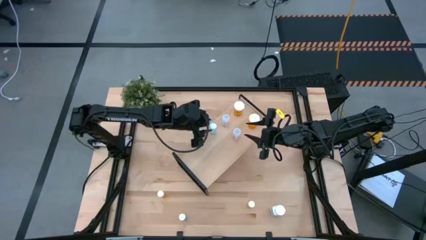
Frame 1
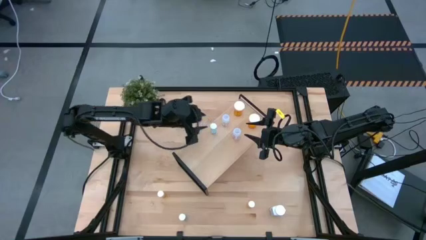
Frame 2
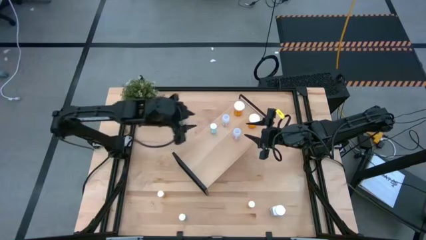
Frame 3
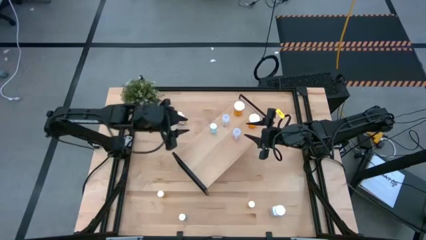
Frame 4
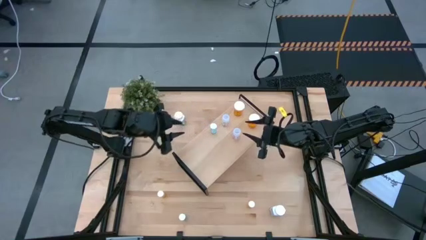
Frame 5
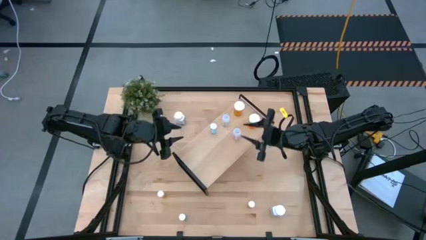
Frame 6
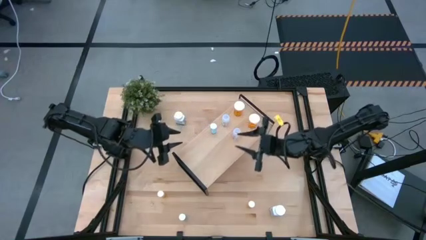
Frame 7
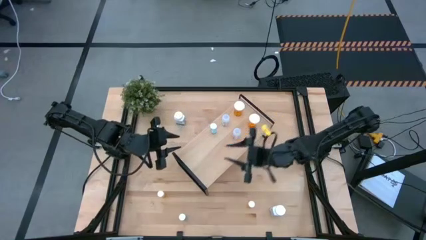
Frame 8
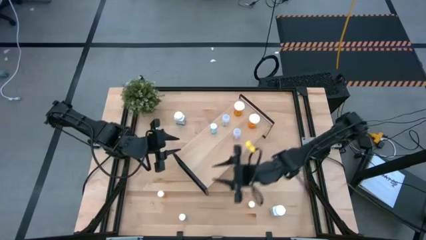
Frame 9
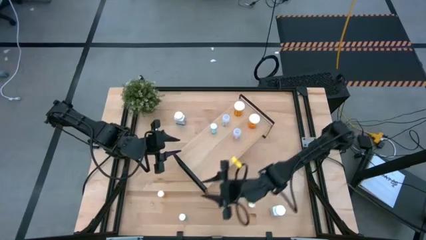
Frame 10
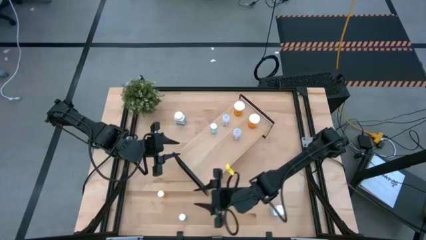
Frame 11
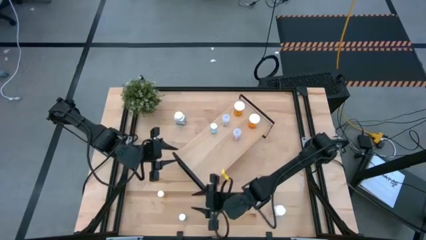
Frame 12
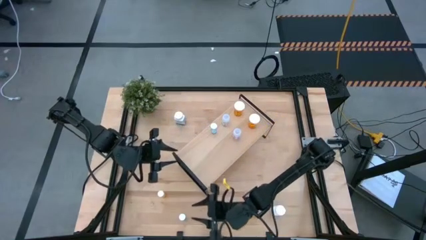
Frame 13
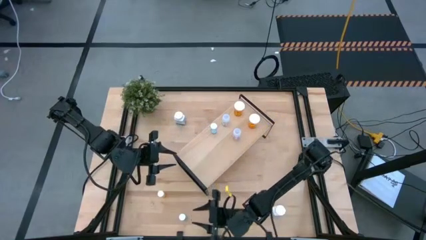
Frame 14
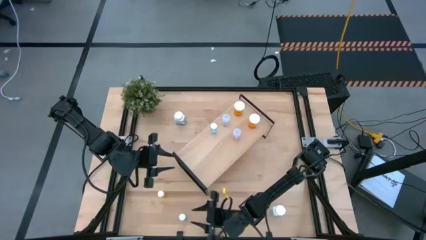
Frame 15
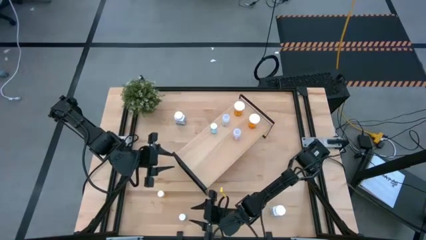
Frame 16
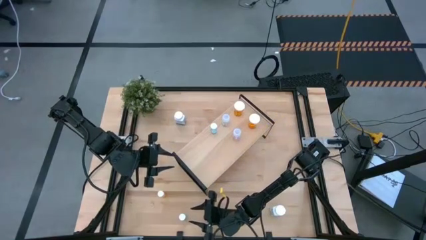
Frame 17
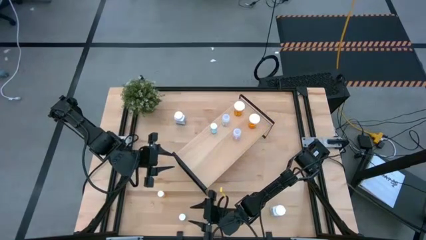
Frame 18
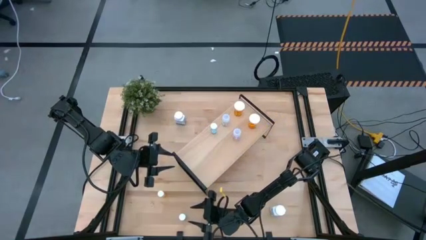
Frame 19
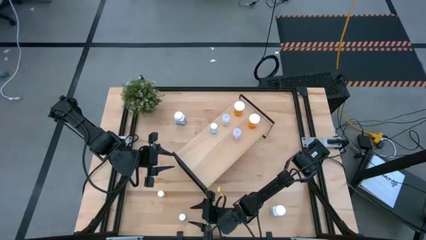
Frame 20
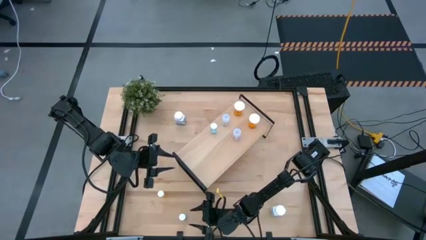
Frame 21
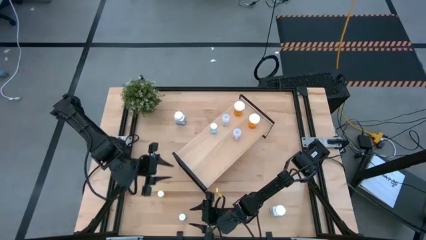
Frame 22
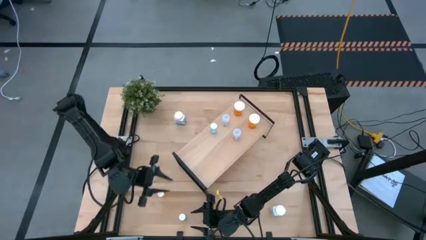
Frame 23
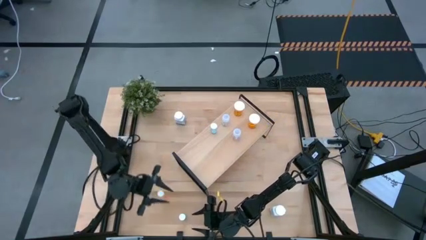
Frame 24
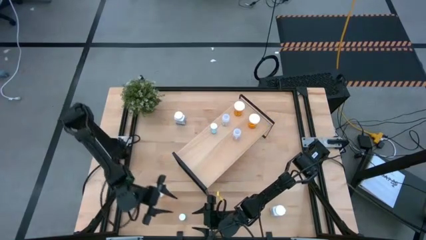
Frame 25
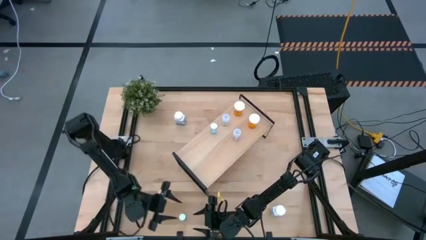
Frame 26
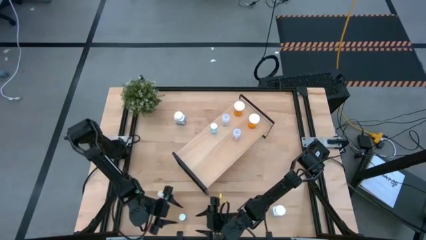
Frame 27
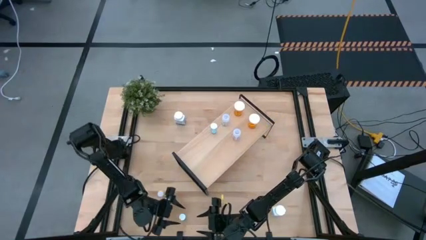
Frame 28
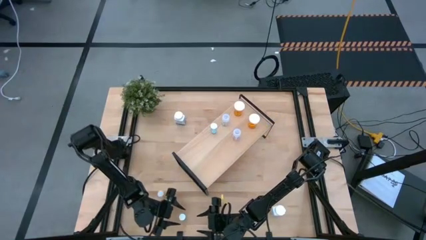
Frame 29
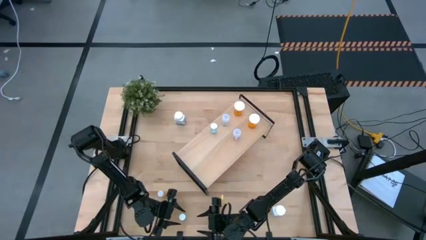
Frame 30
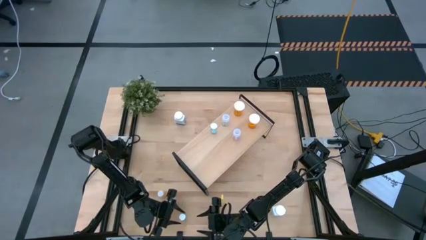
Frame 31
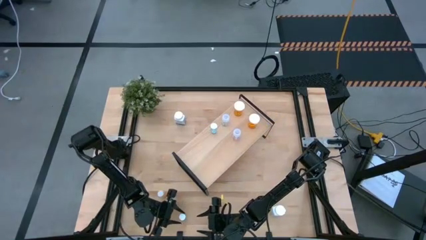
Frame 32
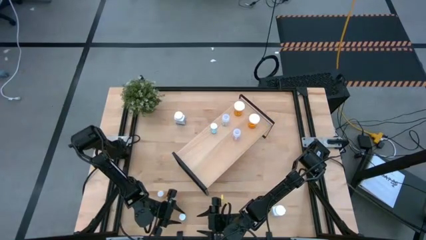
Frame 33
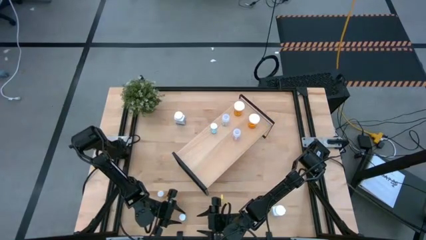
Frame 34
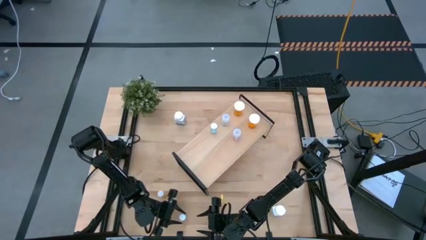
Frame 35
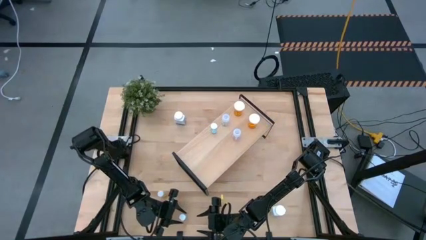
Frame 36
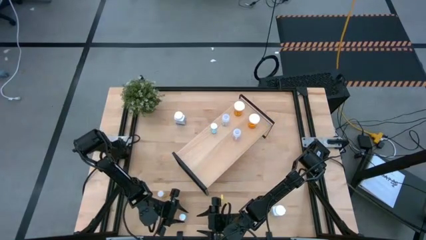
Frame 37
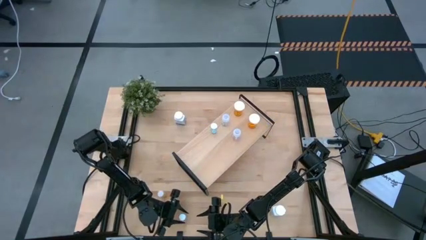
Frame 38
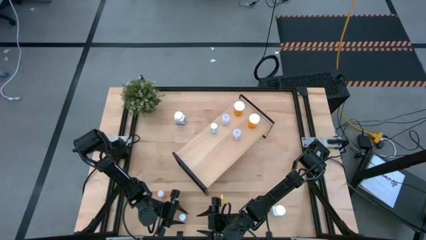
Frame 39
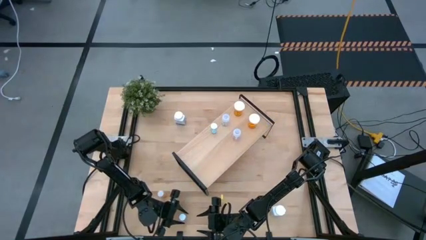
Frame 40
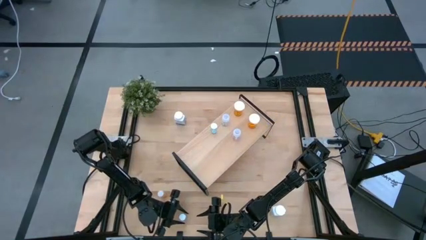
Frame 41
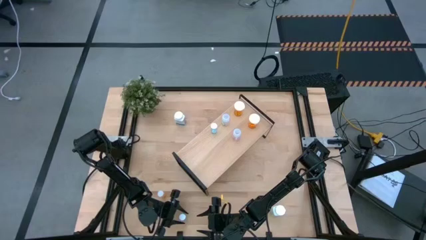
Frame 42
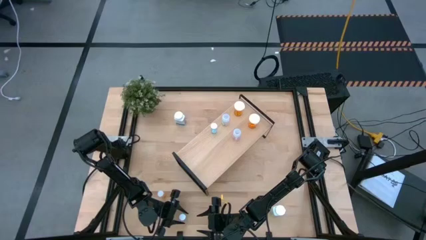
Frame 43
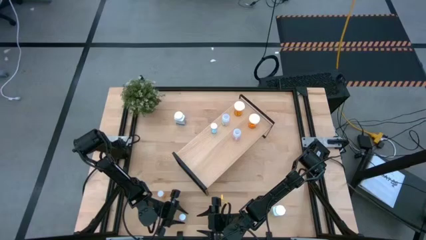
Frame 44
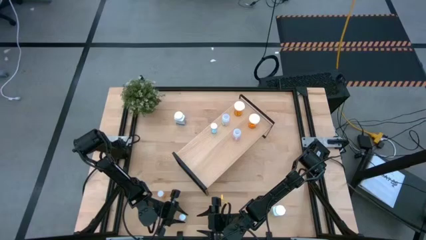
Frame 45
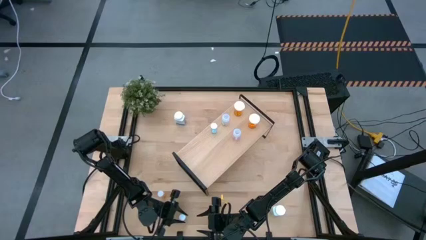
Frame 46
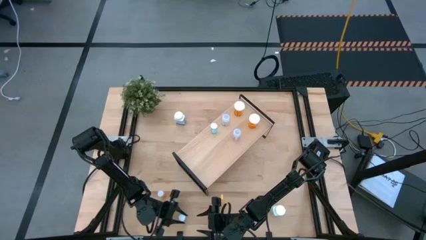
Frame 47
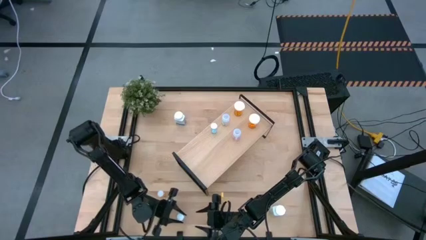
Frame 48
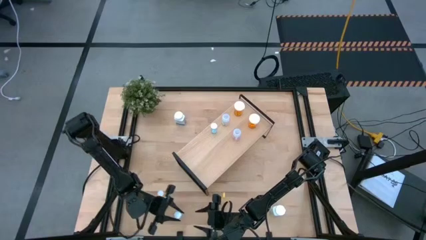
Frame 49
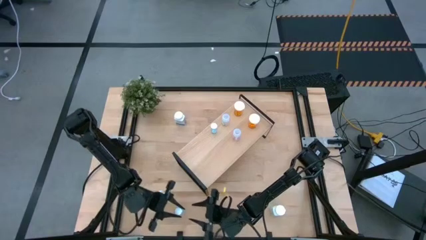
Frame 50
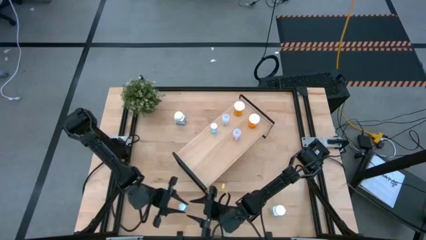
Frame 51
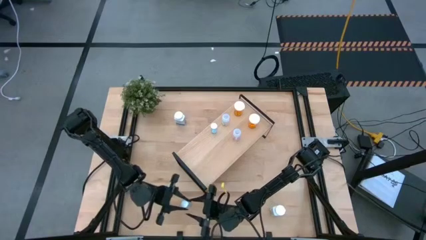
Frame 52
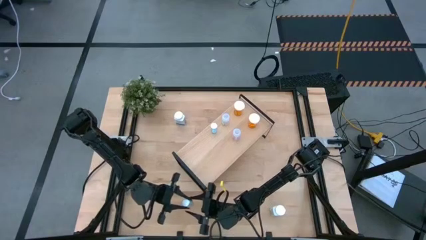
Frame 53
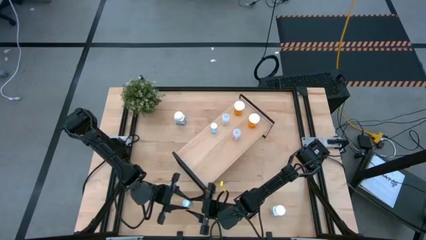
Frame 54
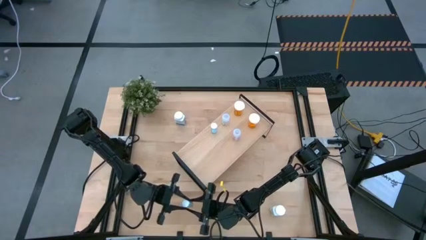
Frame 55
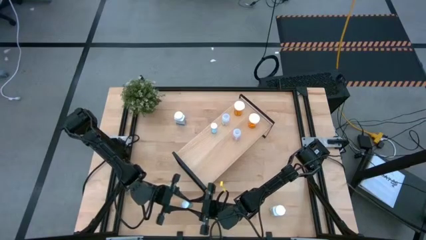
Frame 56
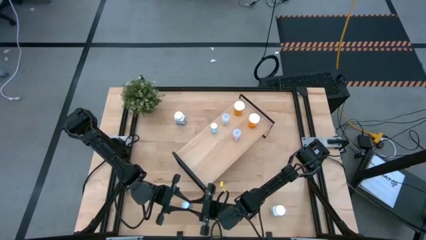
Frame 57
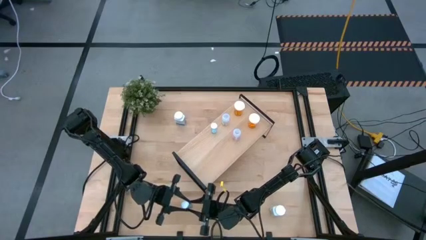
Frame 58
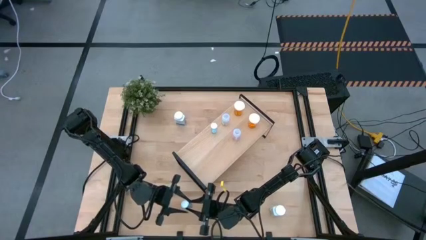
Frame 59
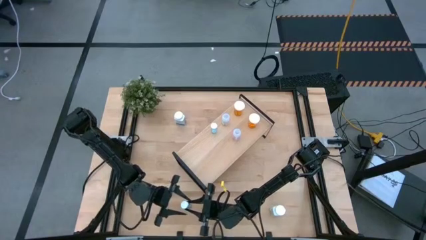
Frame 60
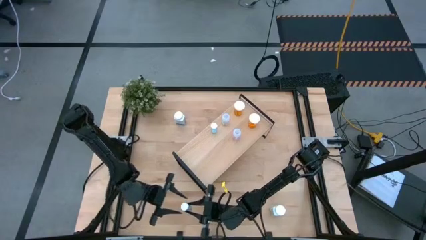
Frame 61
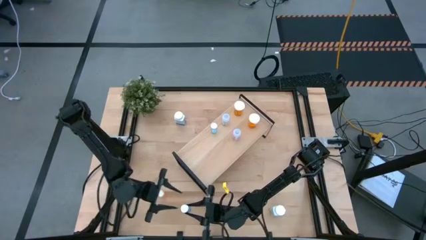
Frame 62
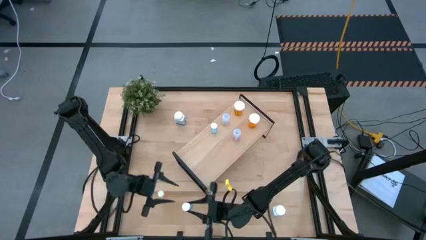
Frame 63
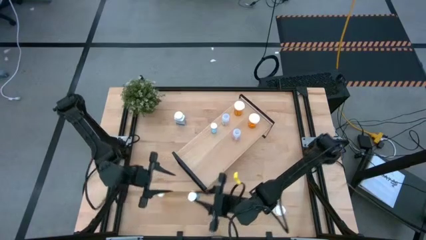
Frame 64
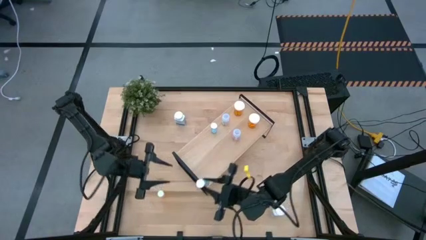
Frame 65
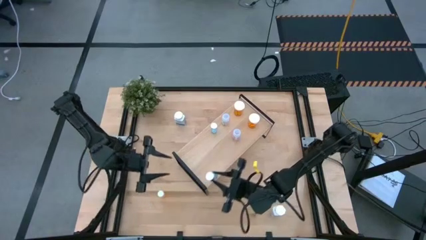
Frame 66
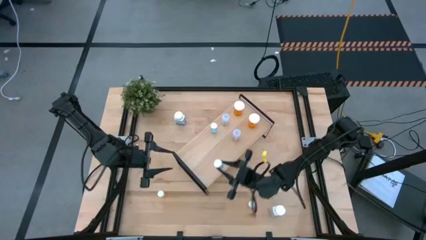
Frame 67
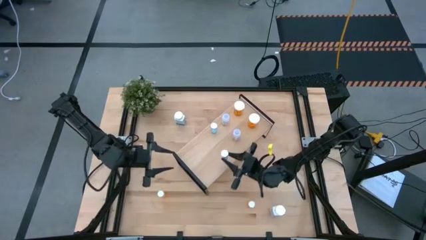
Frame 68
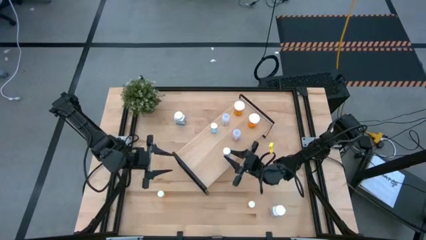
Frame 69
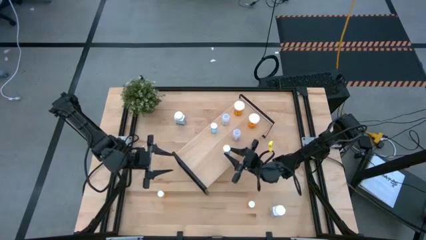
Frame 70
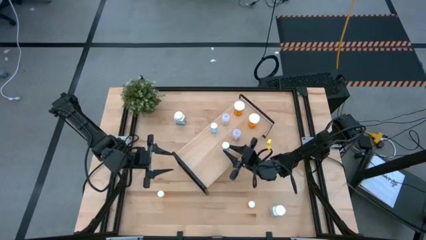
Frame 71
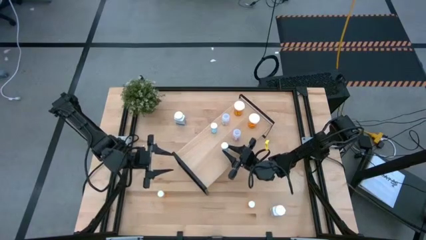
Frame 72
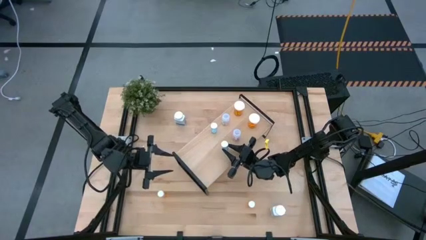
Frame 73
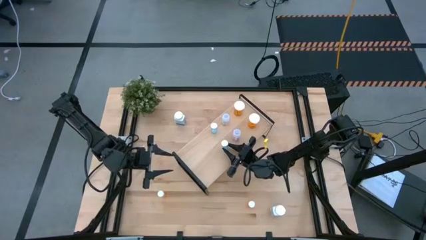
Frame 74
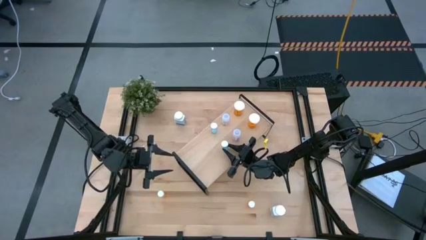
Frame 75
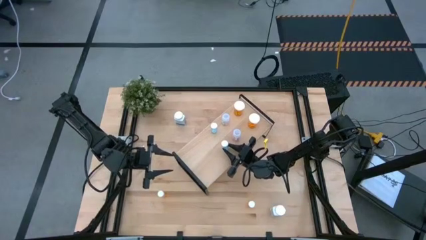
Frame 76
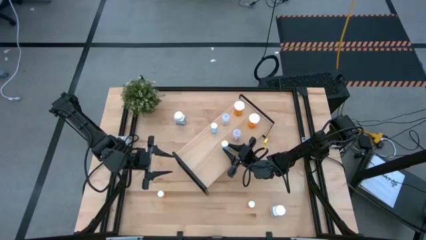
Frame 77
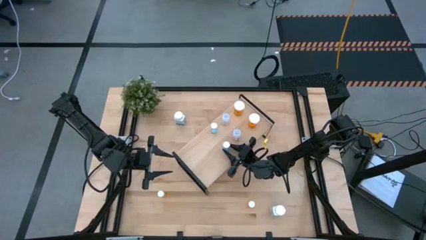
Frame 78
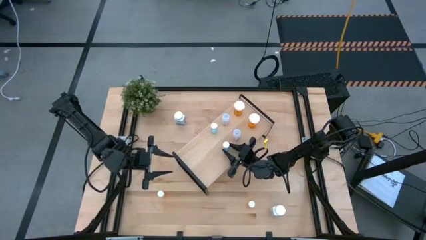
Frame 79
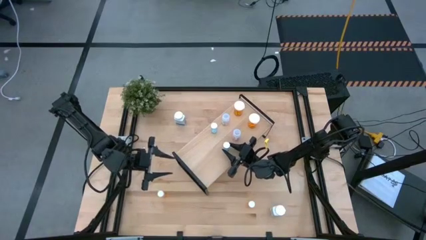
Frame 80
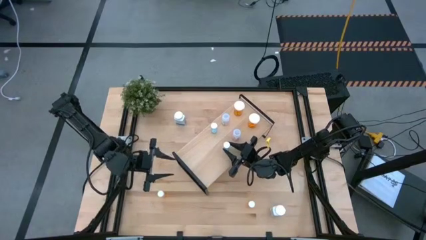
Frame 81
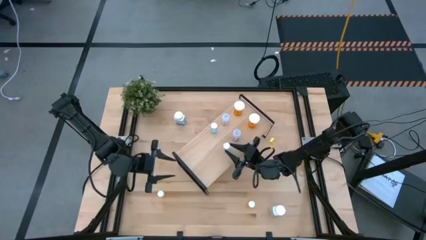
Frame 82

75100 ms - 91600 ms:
Task: Pick and place medicine bottles onto shelf by color
Put the blue pill bottle on the shelf aligned with the other blue pill bottle
